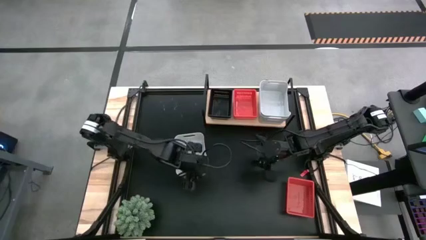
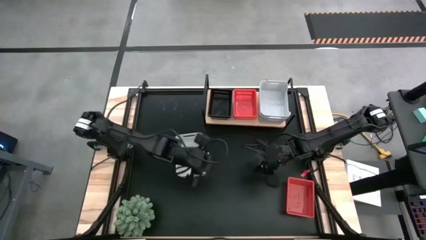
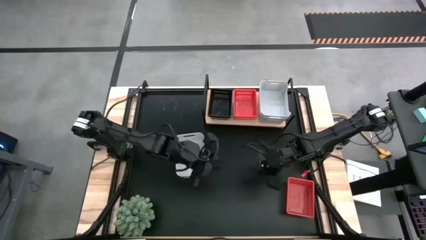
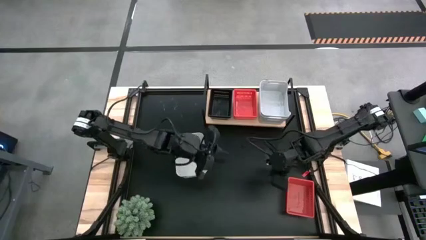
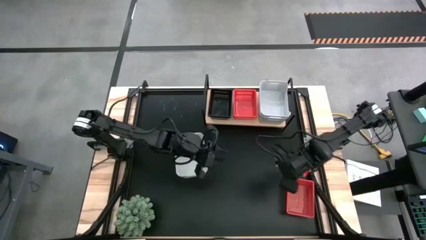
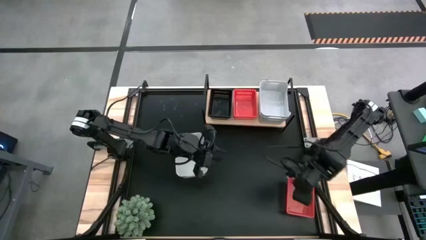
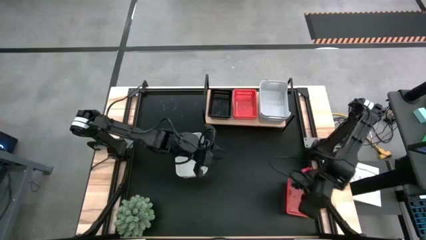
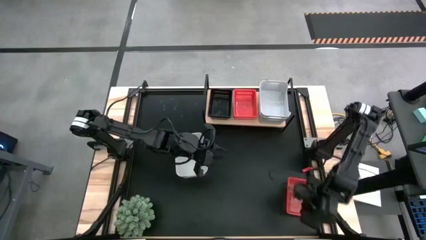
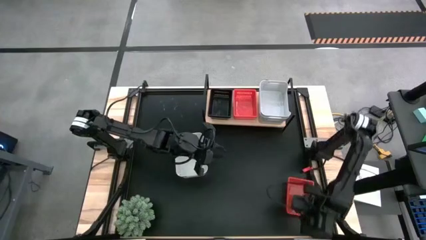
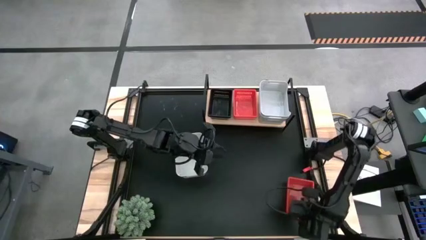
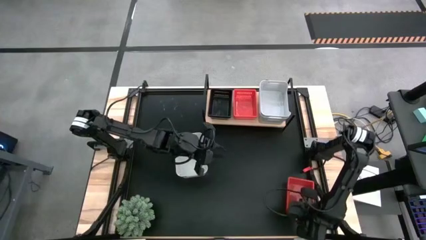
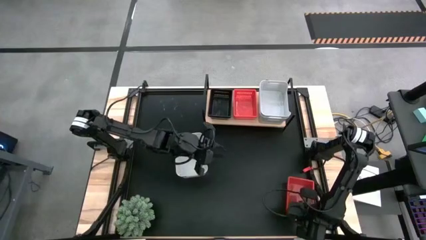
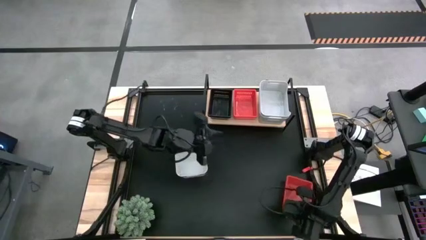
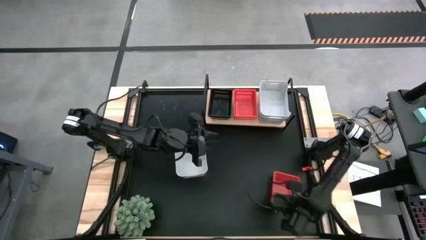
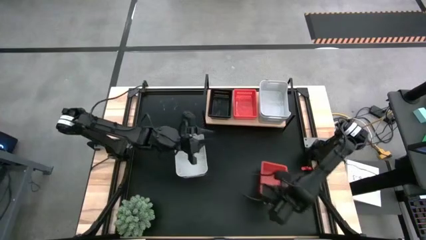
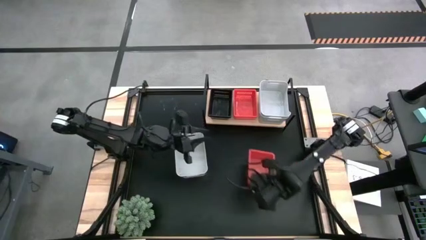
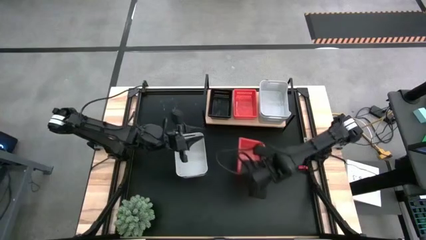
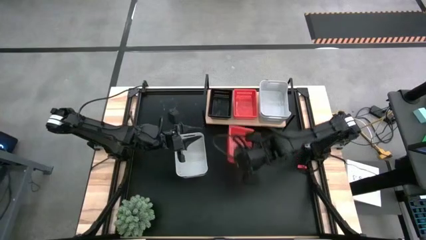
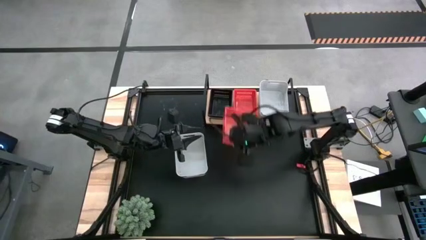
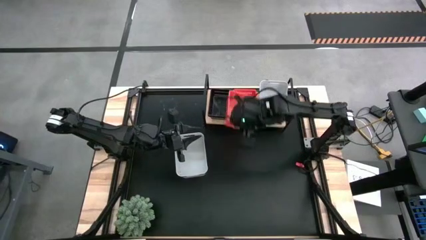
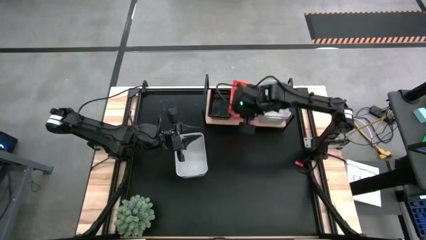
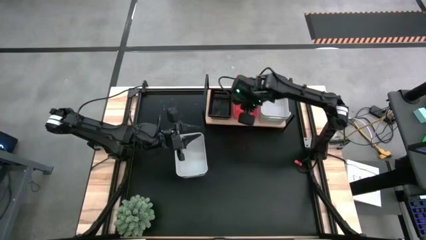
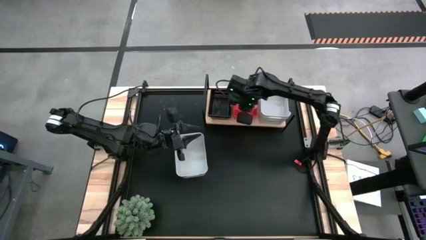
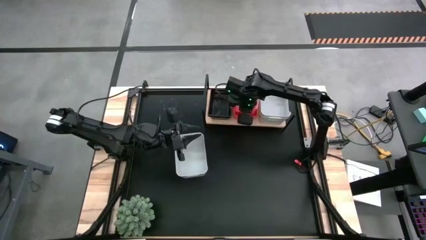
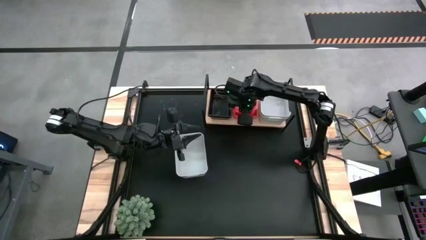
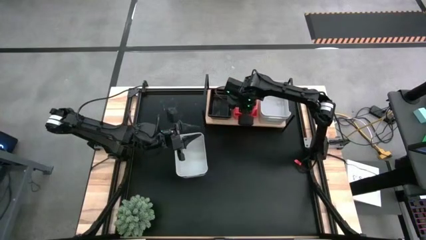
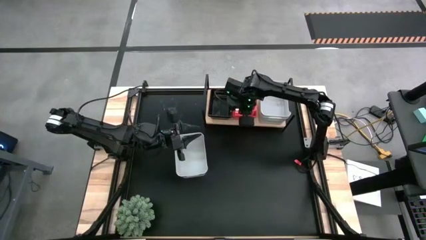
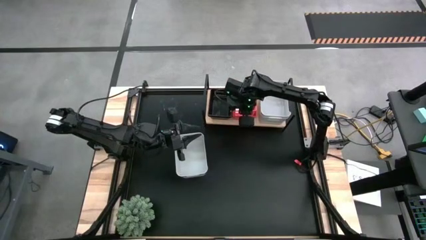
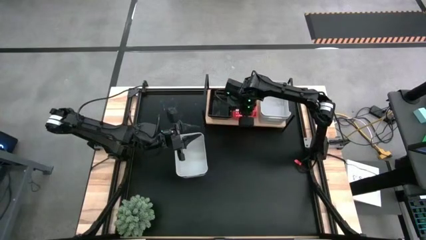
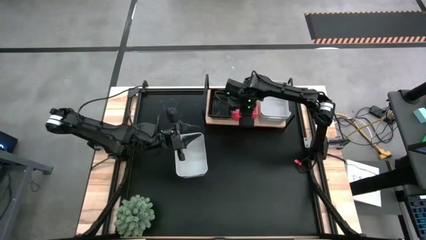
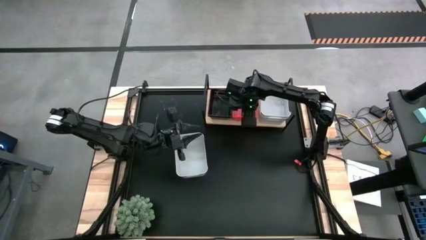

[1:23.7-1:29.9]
Task: Stack baskets on shelf by color
Stack the red bin into the top of the red bins on the shelf

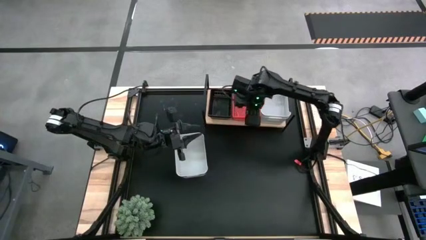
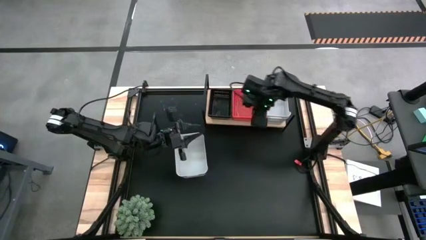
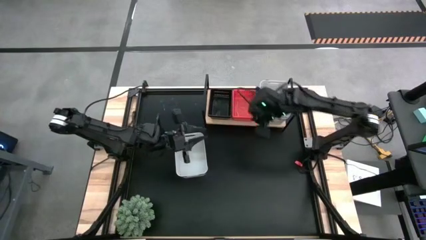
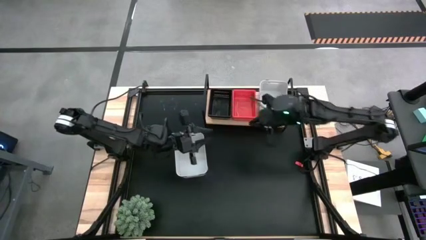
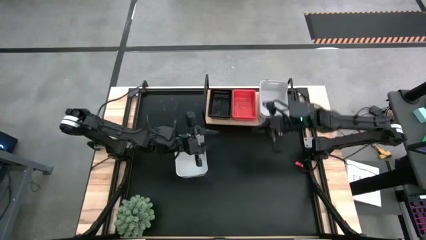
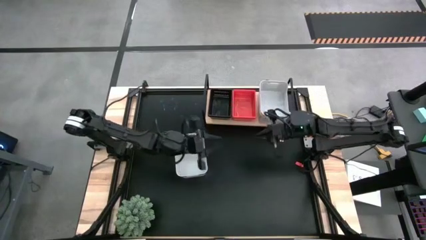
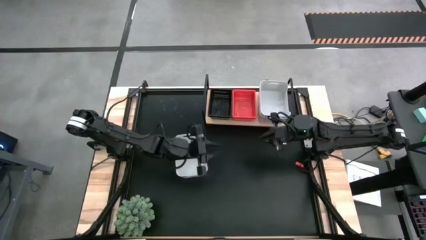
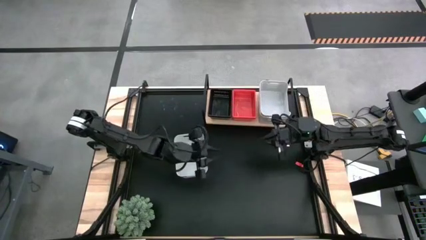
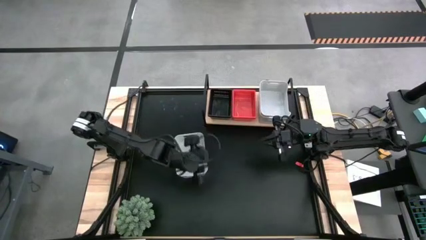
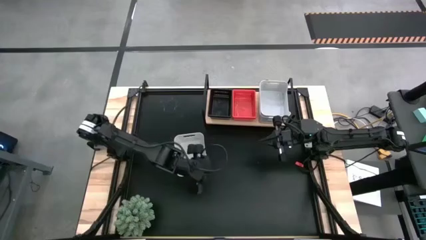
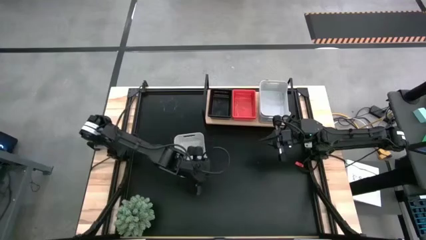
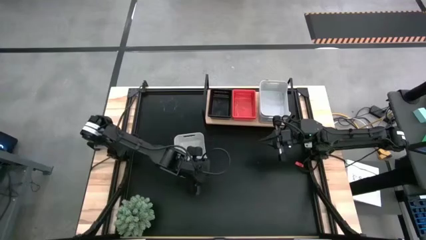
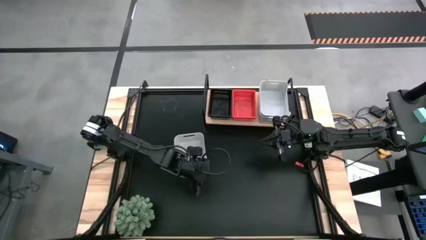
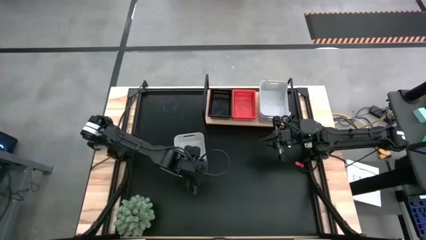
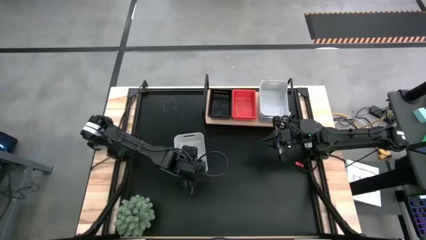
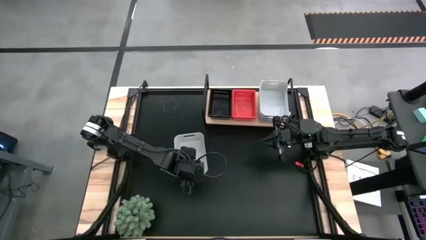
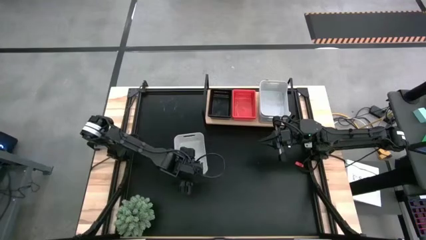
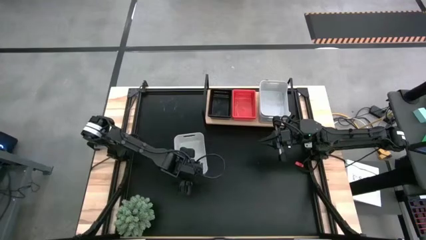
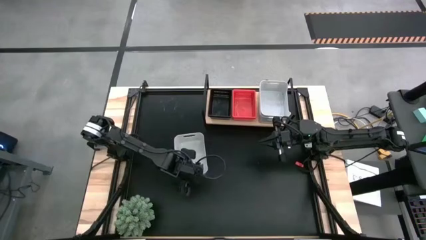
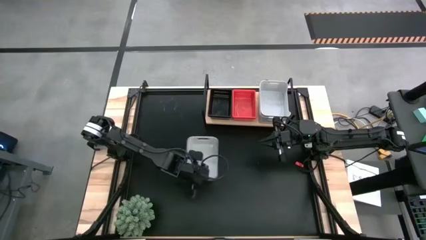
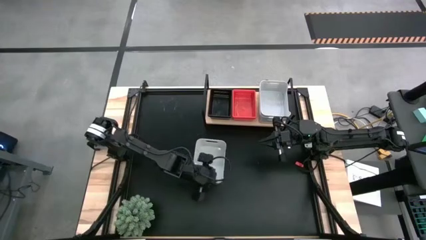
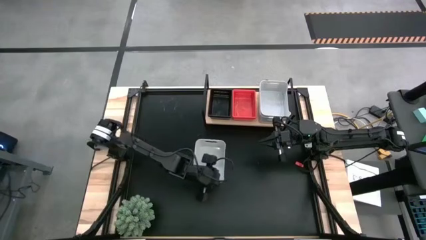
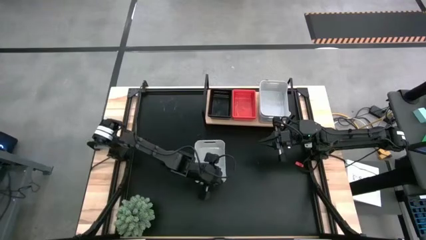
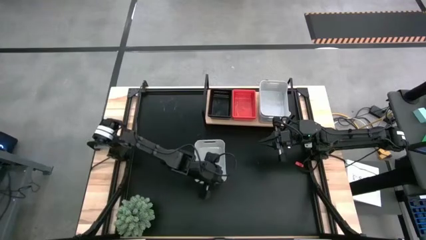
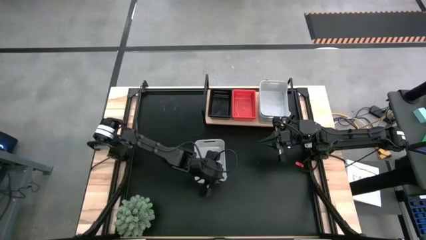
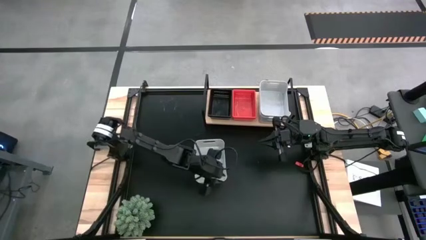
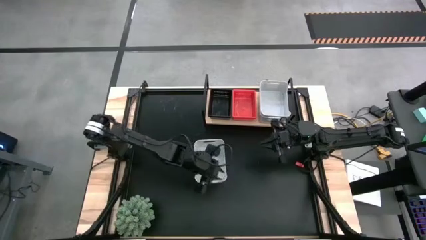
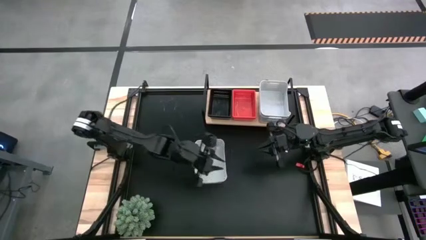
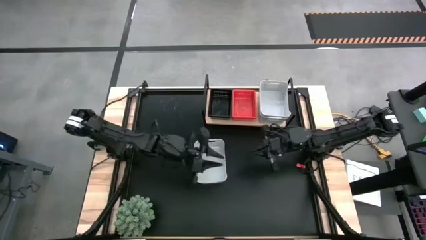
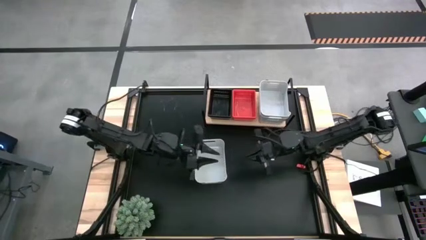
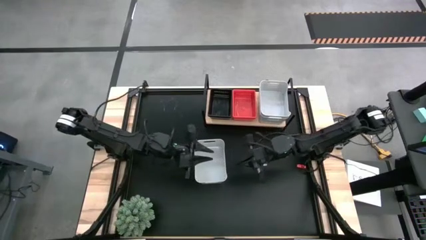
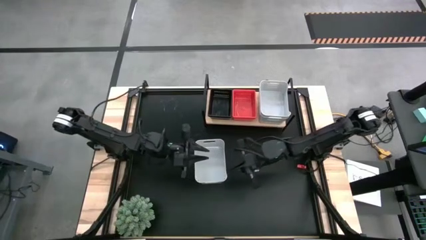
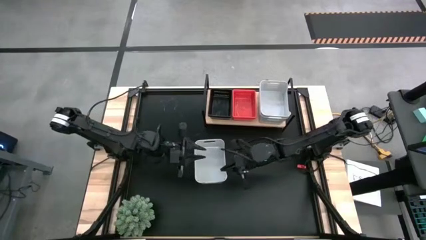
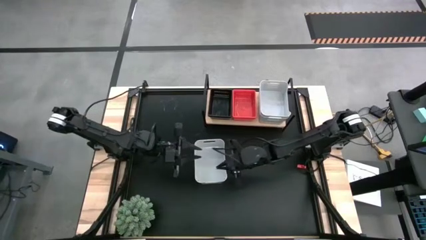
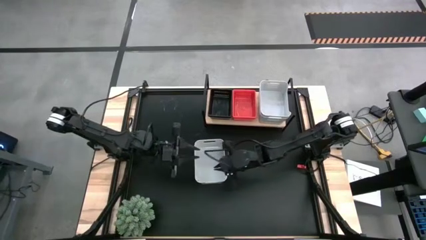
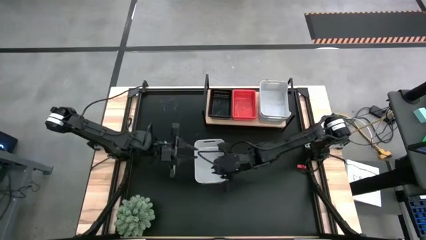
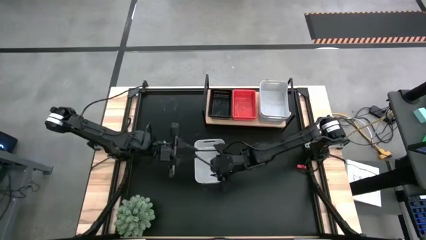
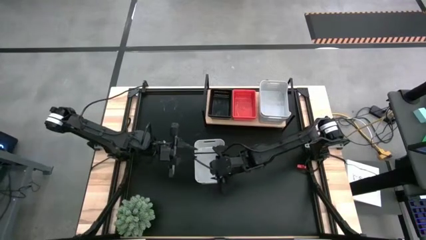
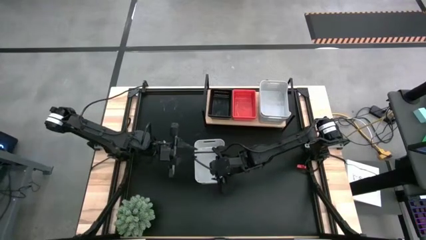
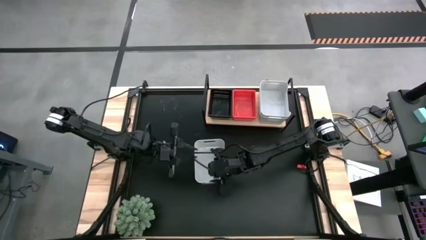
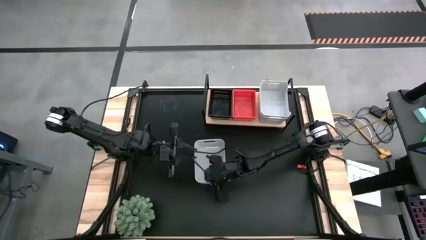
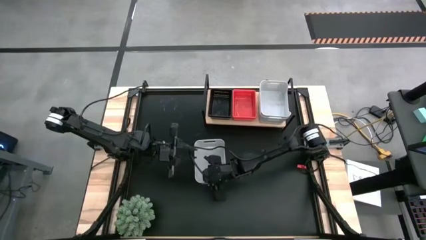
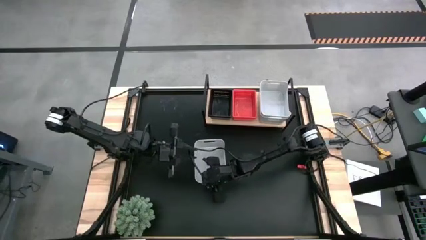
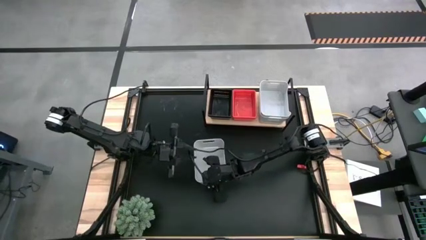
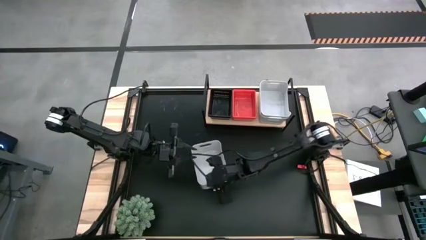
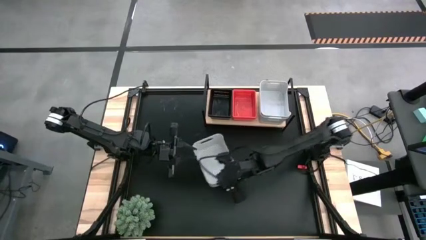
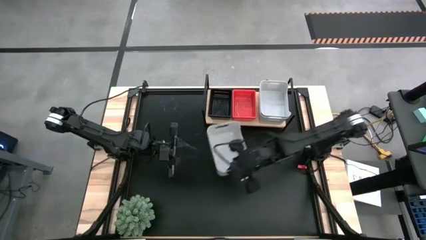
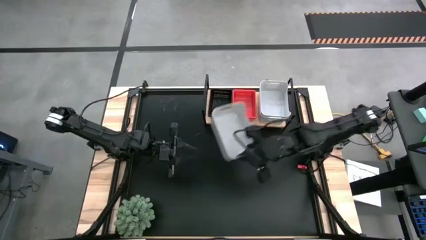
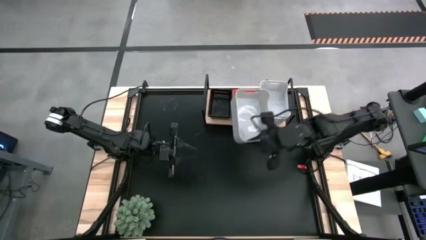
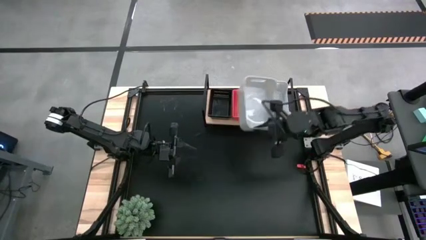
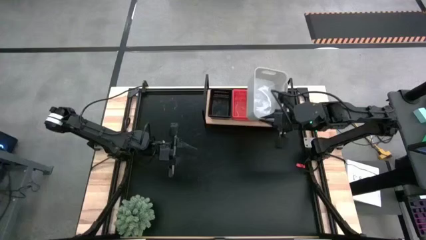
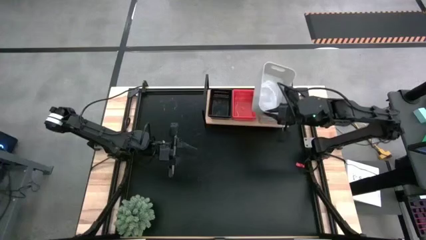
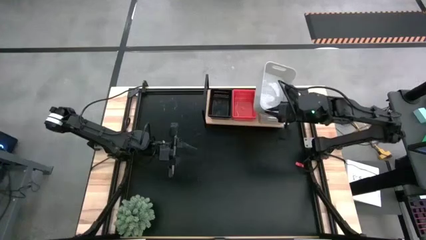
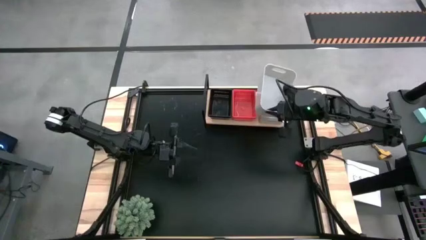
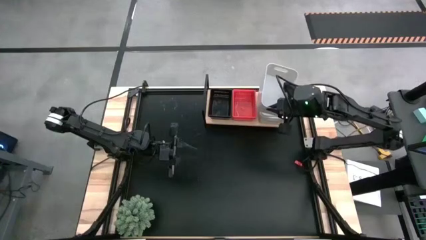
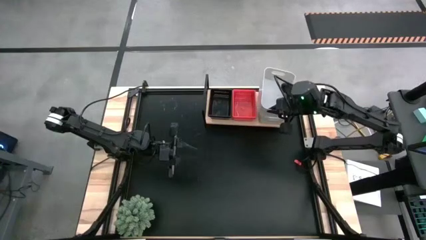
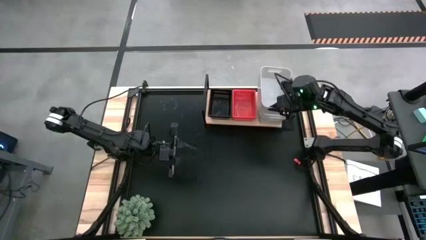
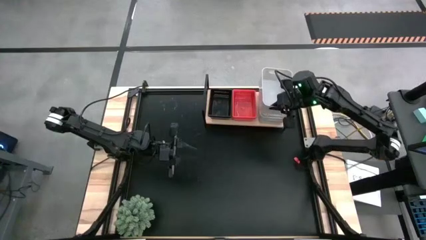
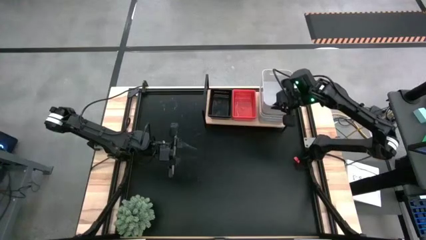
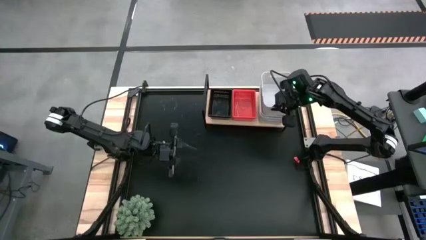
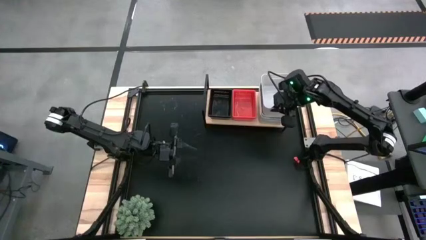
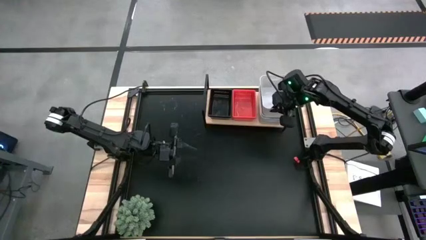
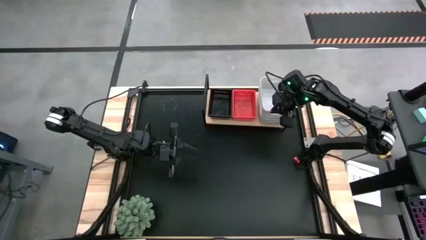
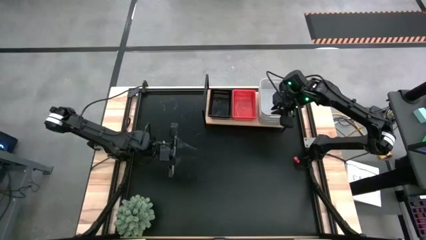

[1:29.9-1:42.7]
Stack the white bin into the top of the white bins on the shelf
